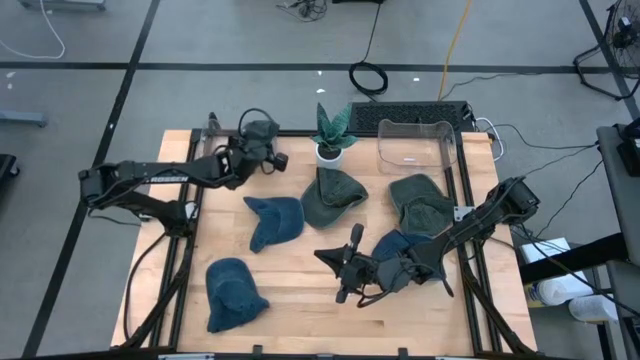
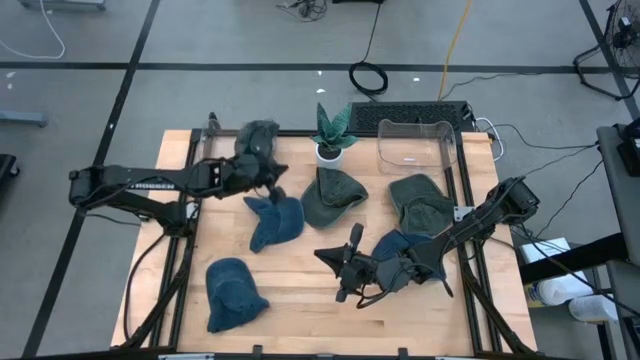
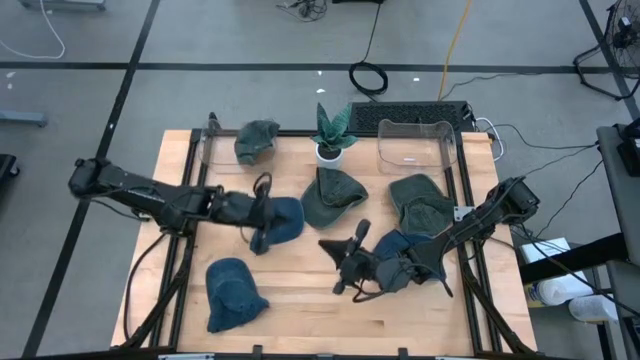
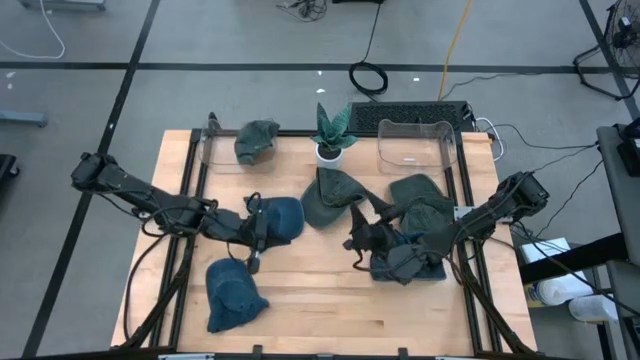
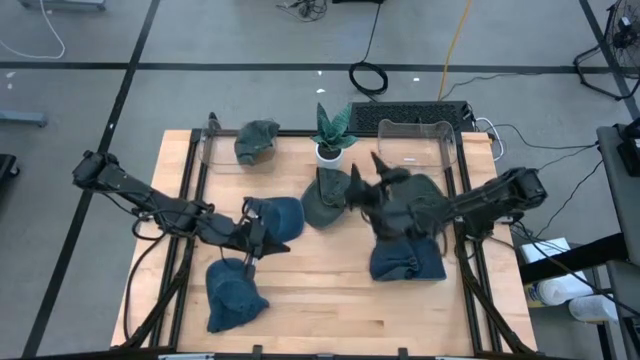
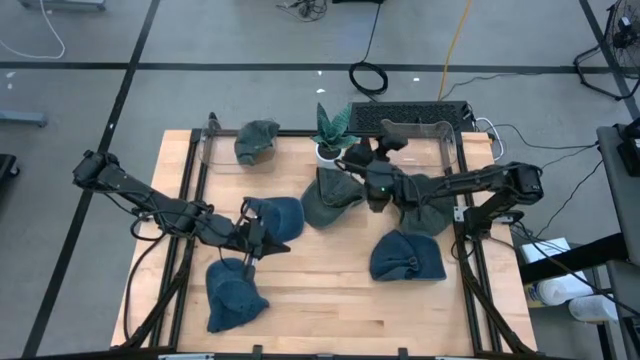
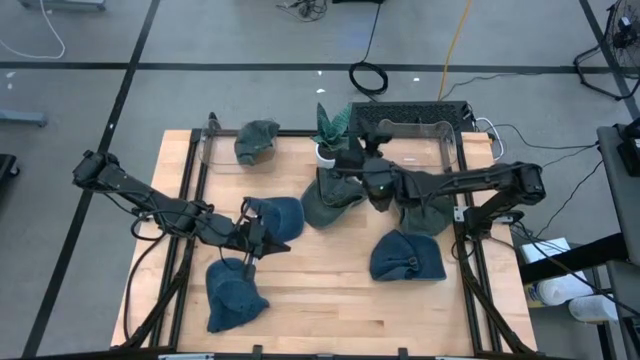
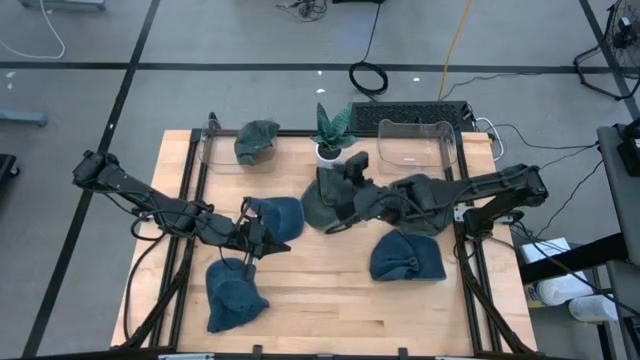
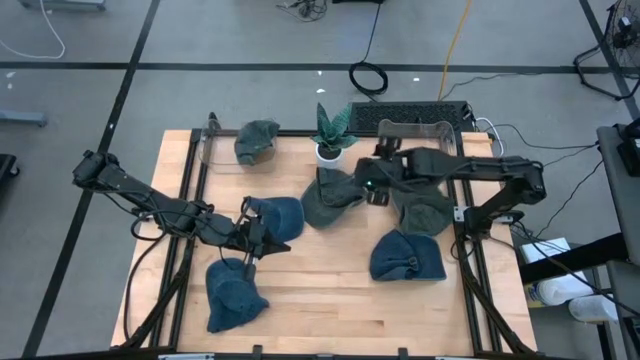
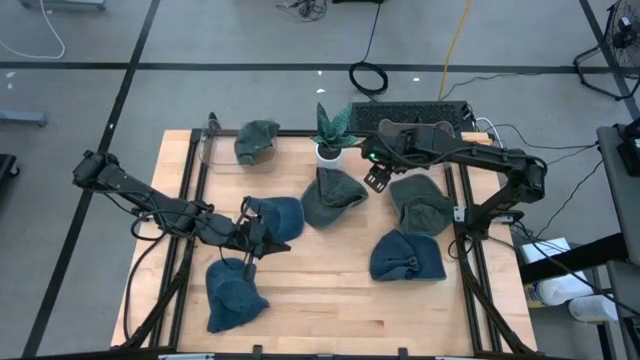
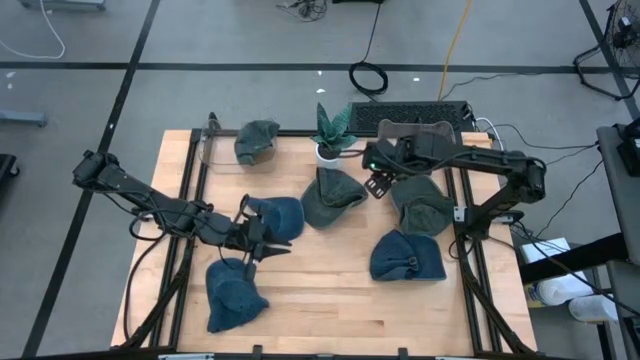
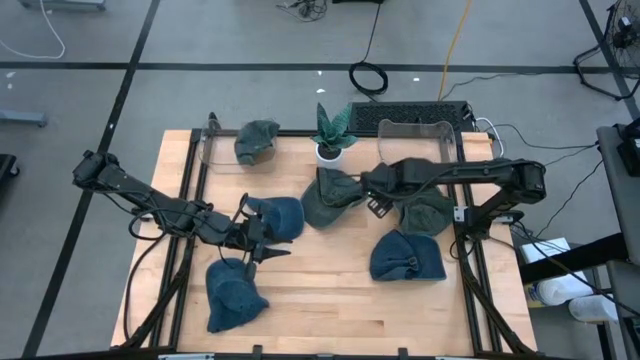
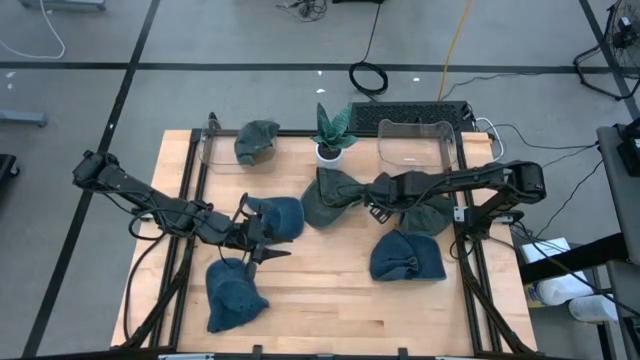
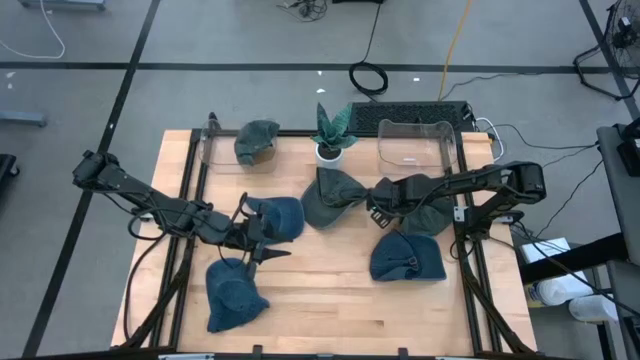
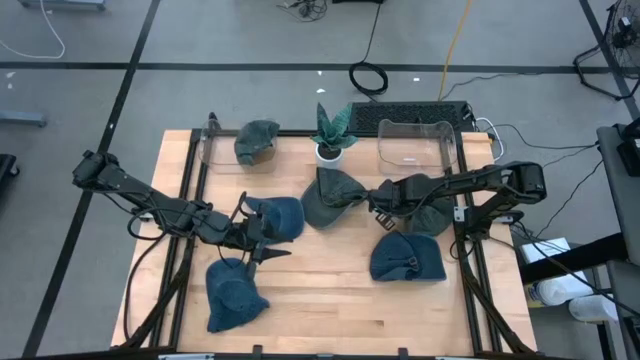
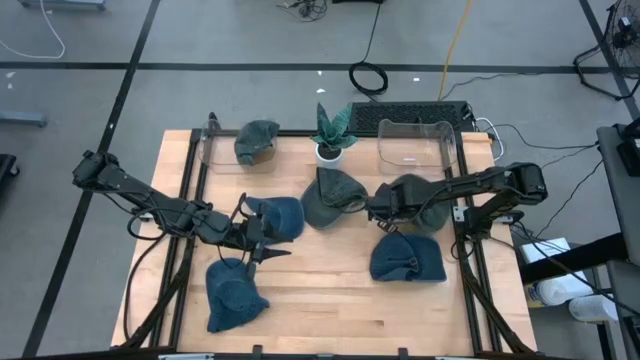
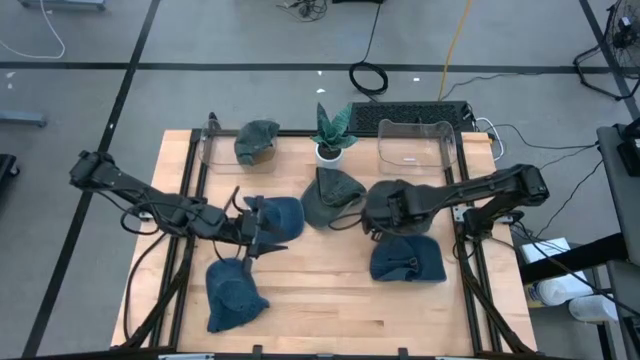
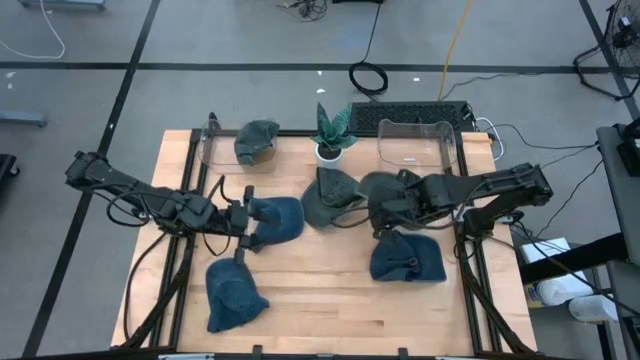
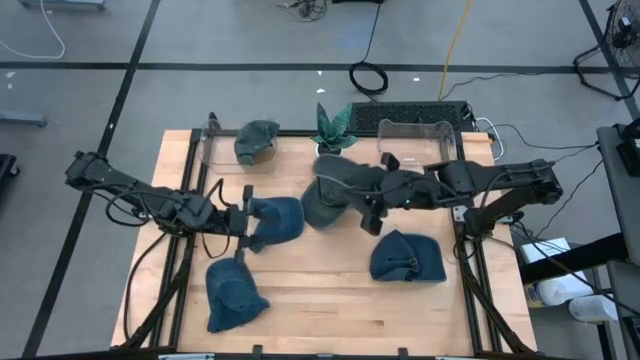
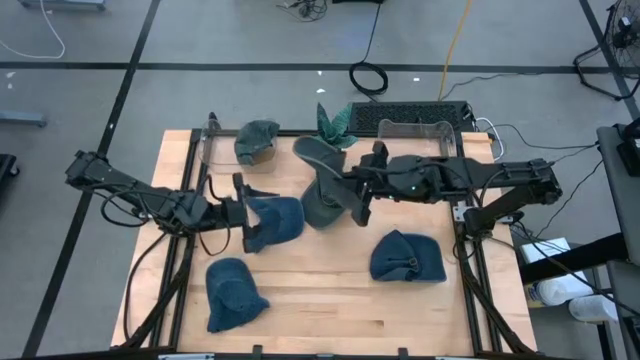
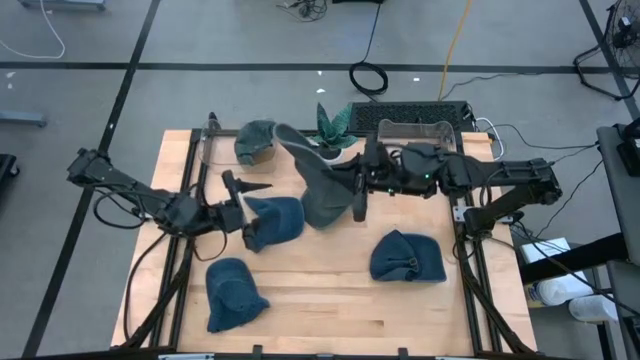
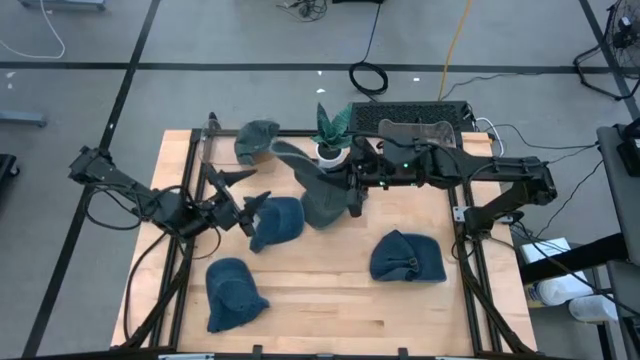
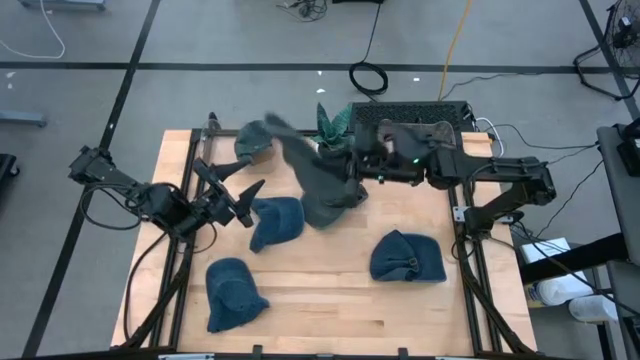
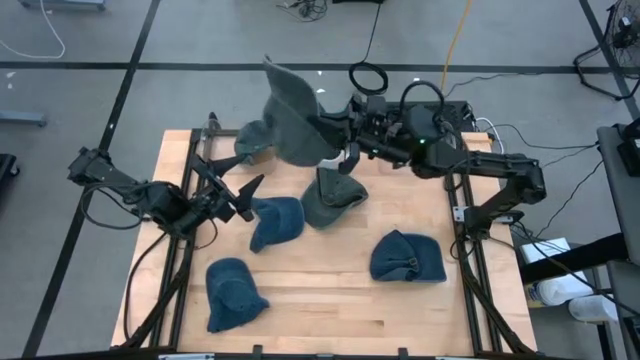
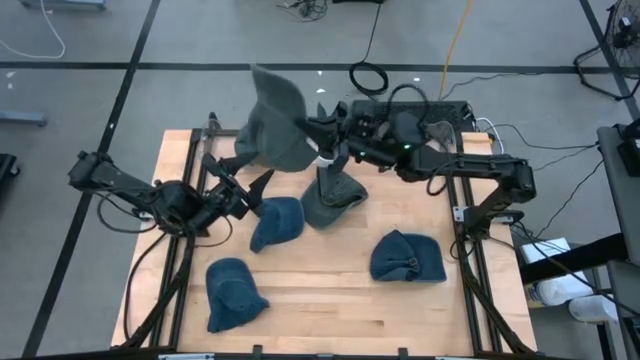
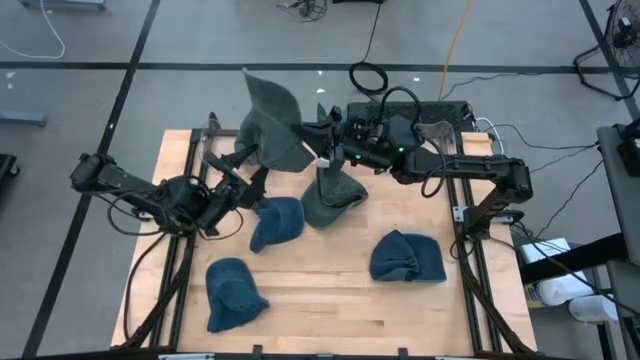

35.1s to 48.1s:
Task: Pick & Place hat
Put the right green cap into the left transparent bin
